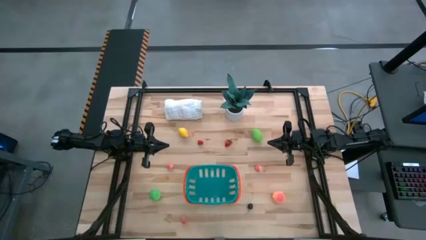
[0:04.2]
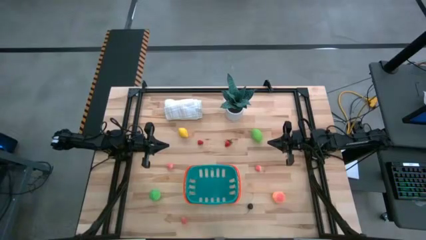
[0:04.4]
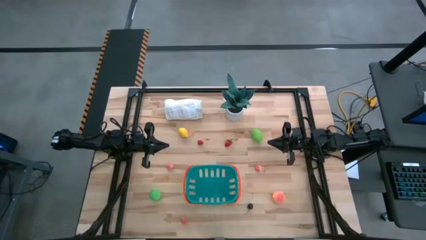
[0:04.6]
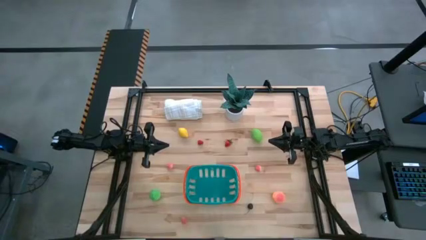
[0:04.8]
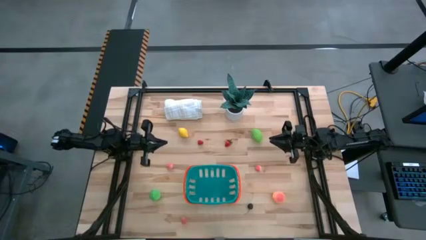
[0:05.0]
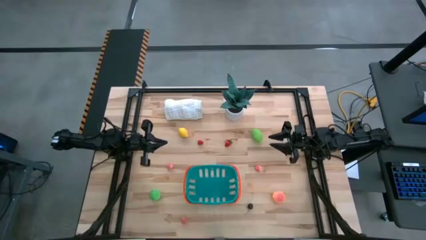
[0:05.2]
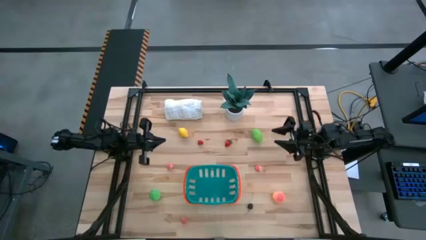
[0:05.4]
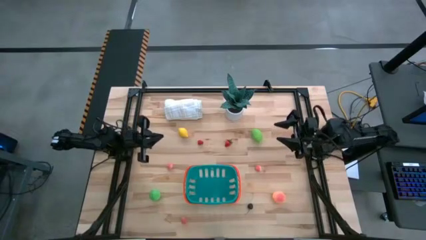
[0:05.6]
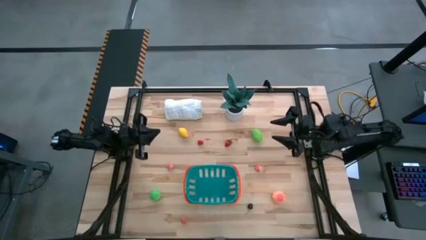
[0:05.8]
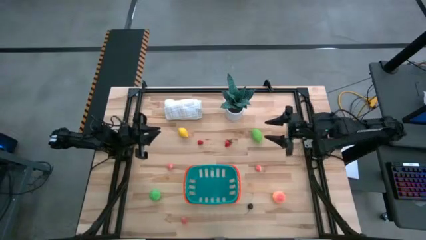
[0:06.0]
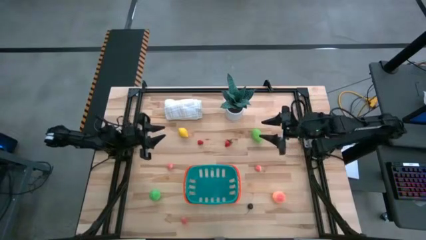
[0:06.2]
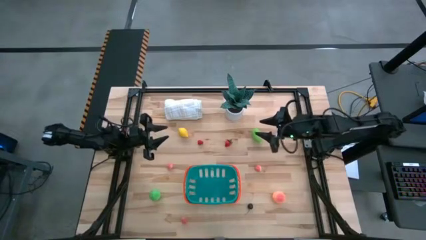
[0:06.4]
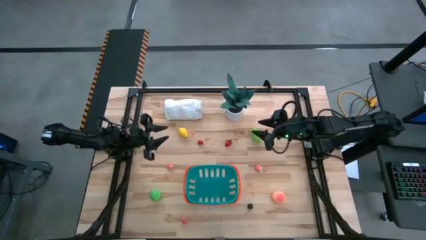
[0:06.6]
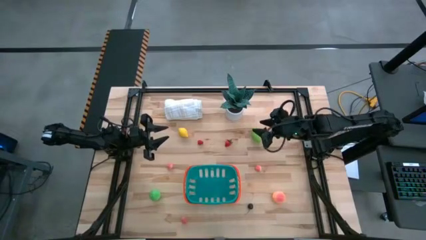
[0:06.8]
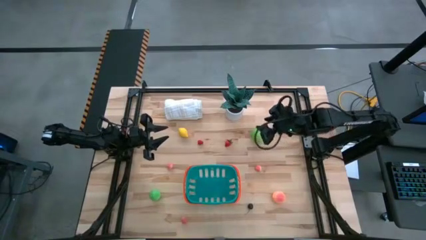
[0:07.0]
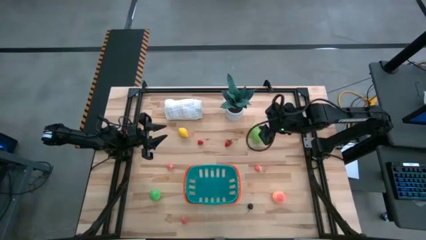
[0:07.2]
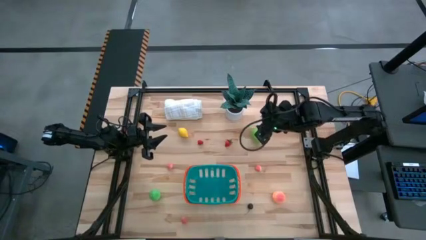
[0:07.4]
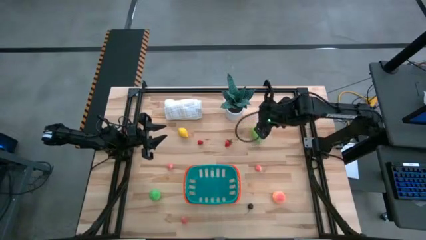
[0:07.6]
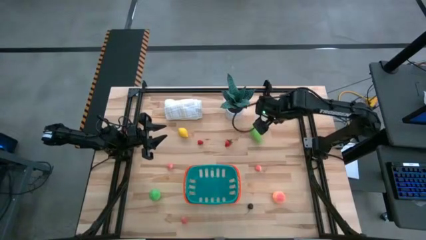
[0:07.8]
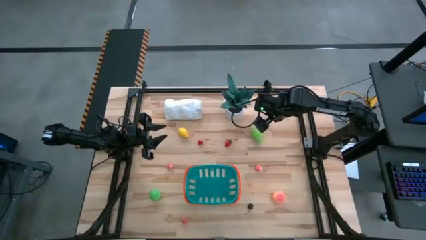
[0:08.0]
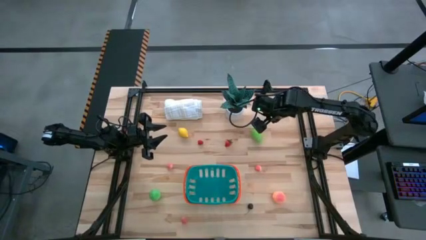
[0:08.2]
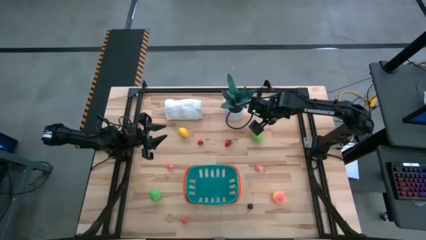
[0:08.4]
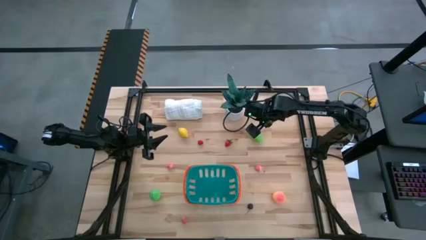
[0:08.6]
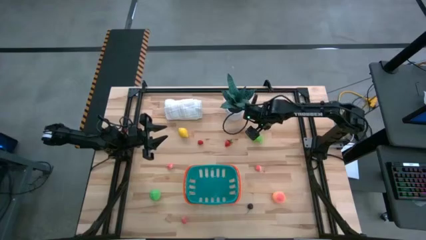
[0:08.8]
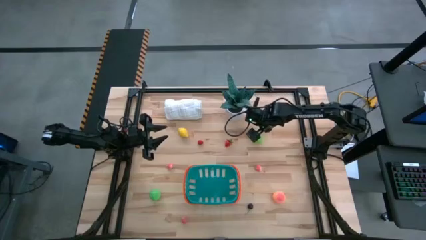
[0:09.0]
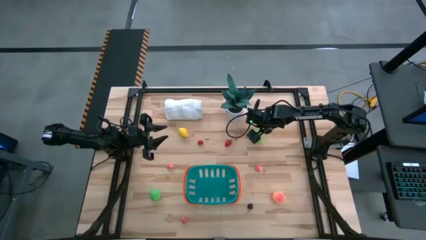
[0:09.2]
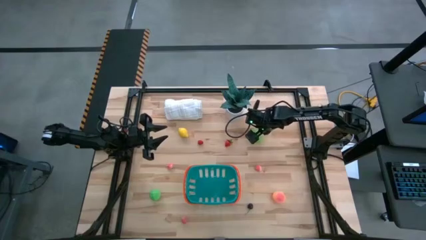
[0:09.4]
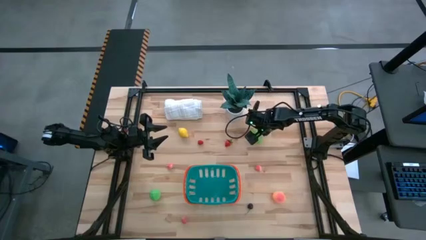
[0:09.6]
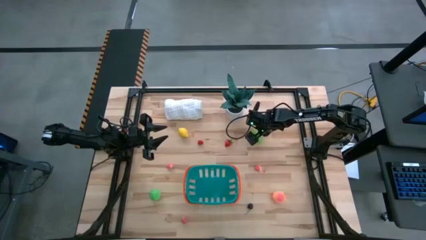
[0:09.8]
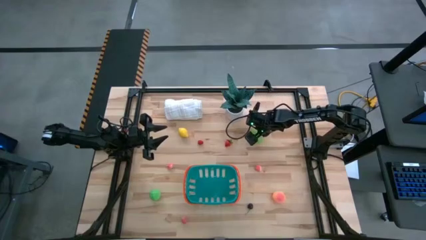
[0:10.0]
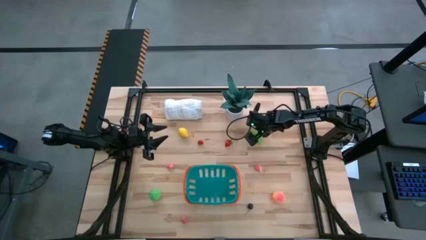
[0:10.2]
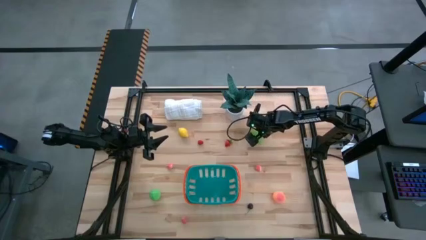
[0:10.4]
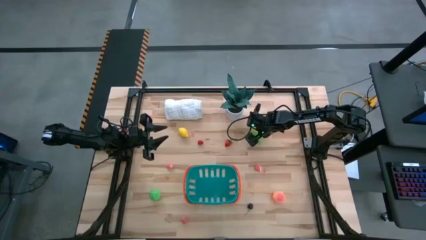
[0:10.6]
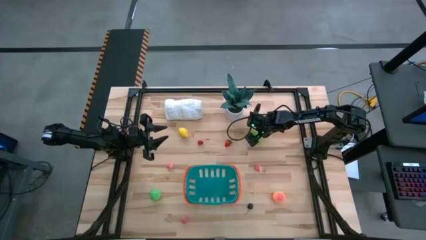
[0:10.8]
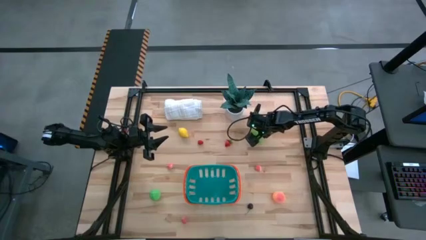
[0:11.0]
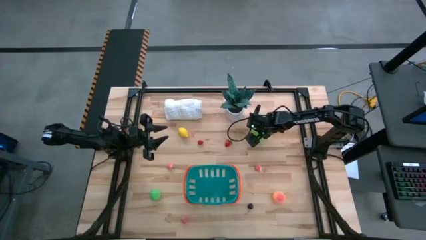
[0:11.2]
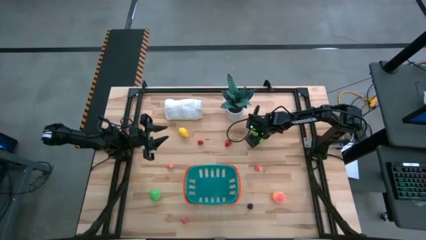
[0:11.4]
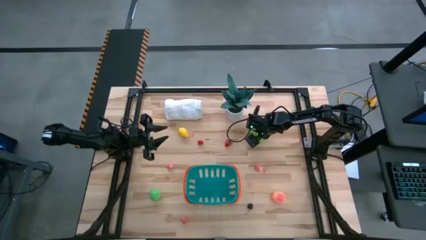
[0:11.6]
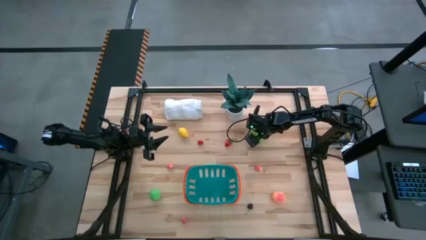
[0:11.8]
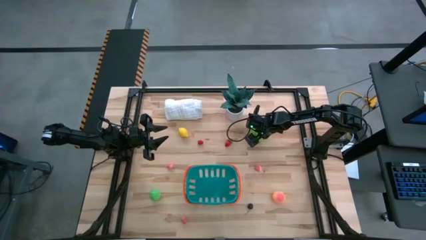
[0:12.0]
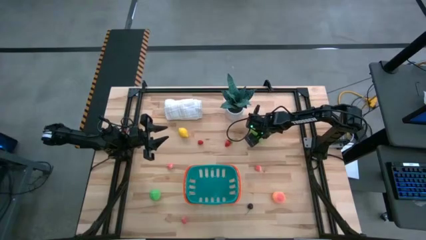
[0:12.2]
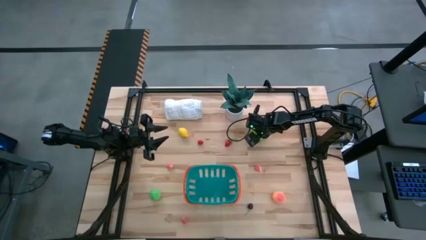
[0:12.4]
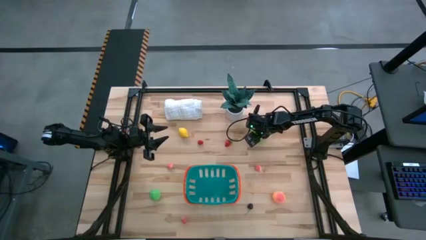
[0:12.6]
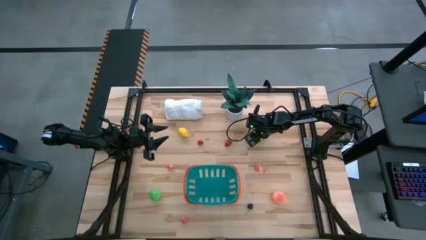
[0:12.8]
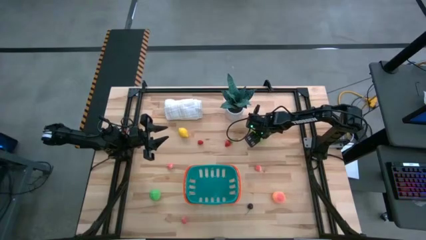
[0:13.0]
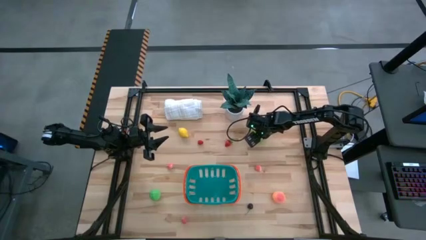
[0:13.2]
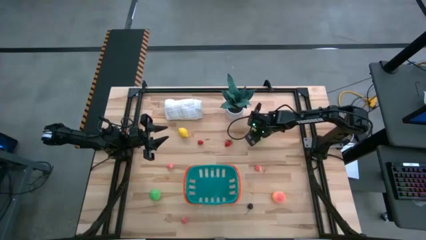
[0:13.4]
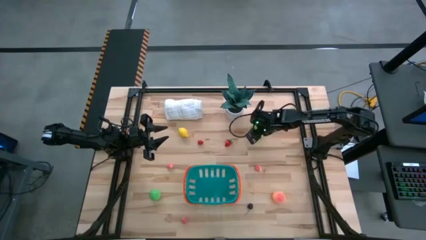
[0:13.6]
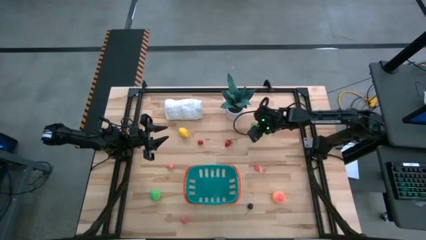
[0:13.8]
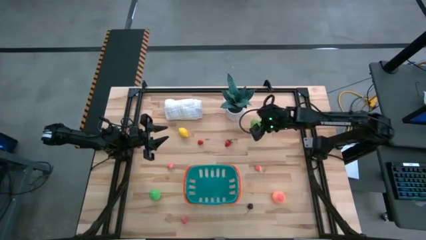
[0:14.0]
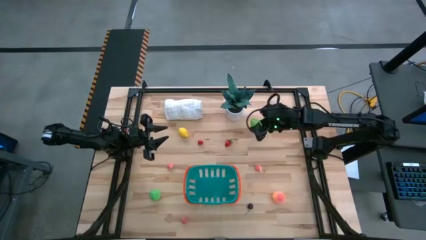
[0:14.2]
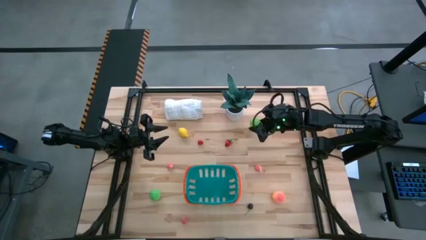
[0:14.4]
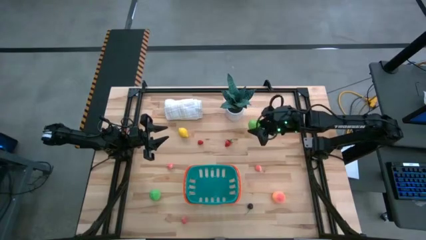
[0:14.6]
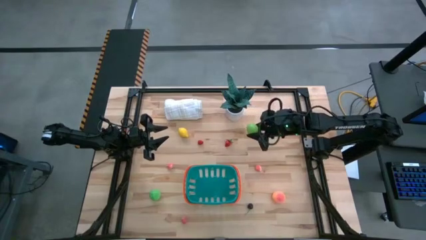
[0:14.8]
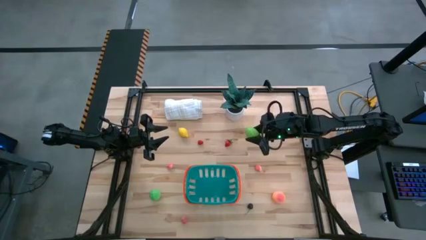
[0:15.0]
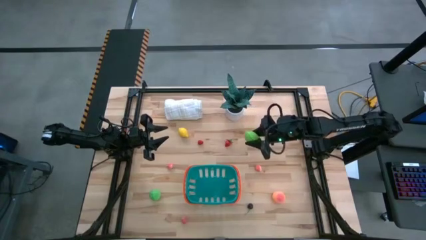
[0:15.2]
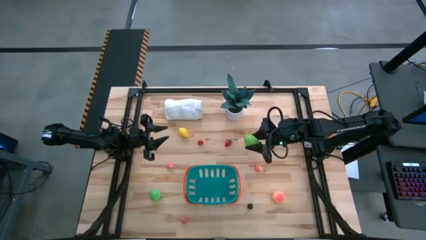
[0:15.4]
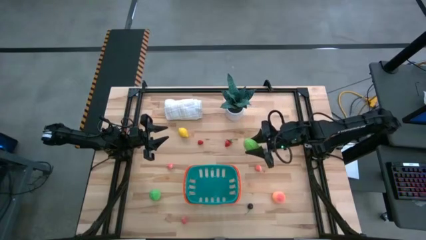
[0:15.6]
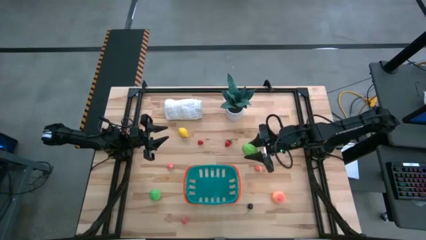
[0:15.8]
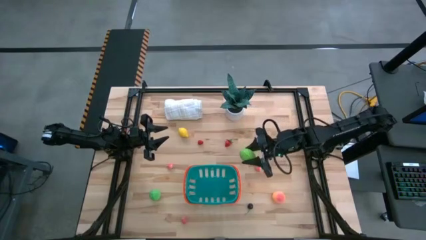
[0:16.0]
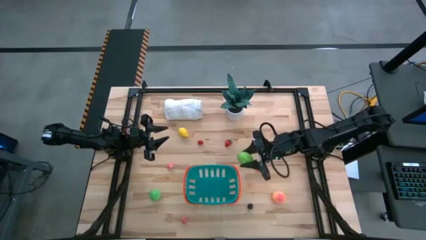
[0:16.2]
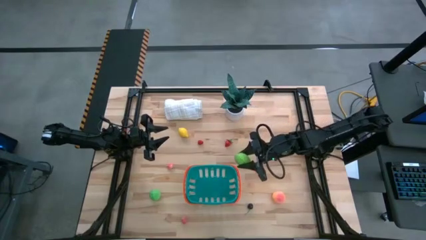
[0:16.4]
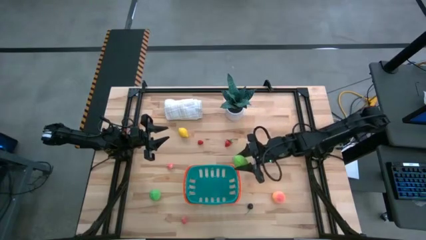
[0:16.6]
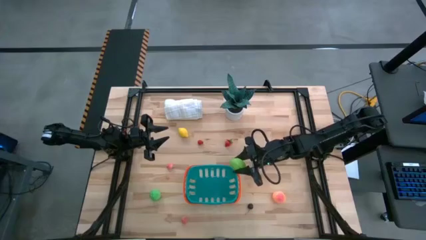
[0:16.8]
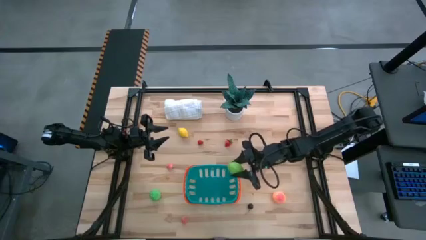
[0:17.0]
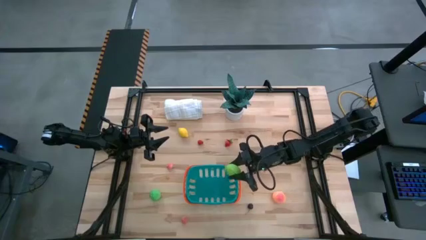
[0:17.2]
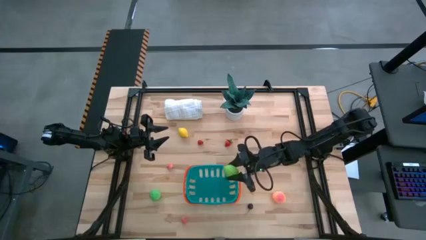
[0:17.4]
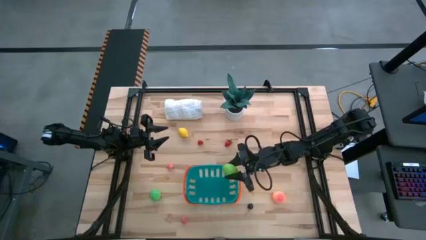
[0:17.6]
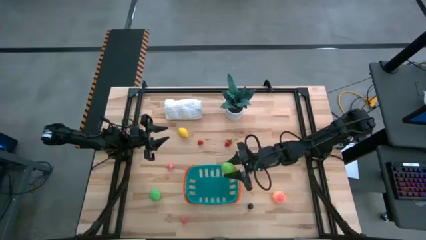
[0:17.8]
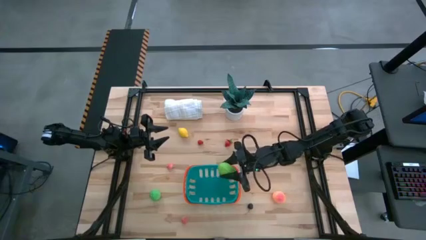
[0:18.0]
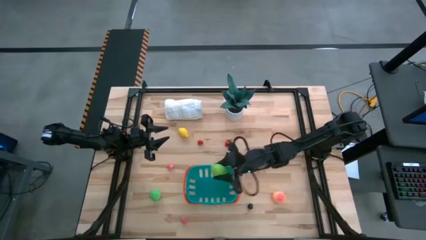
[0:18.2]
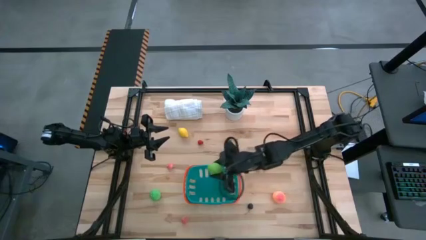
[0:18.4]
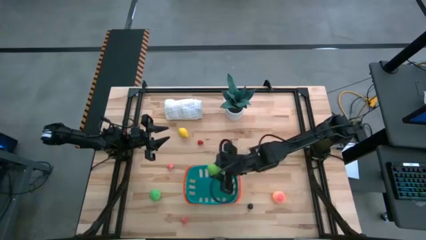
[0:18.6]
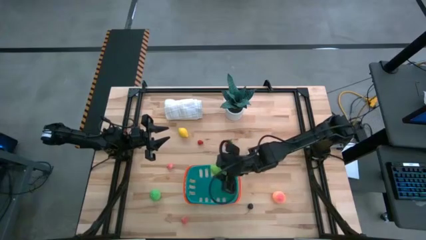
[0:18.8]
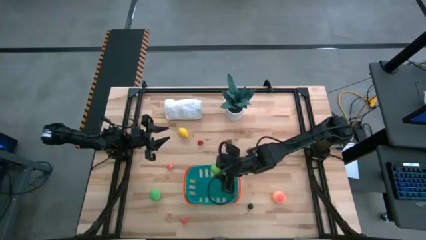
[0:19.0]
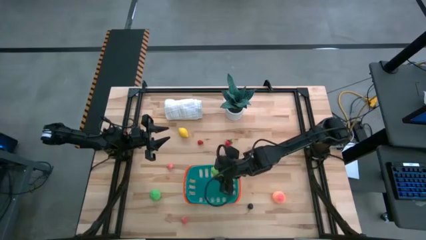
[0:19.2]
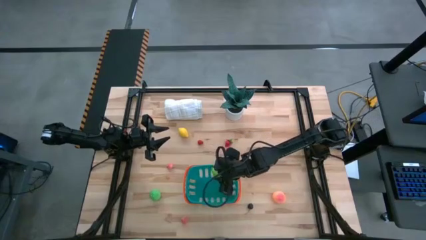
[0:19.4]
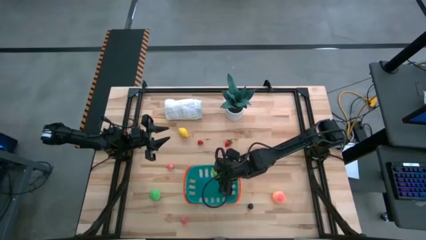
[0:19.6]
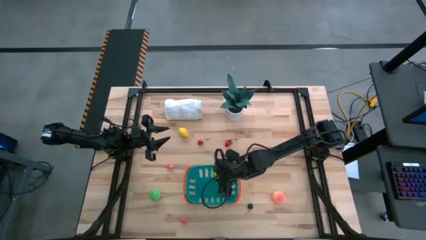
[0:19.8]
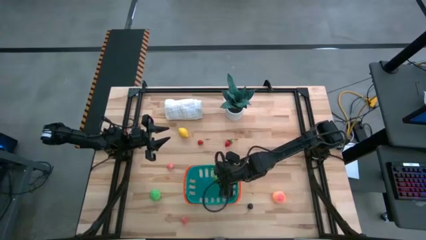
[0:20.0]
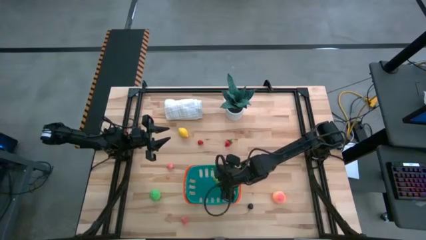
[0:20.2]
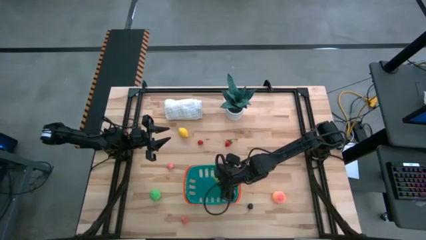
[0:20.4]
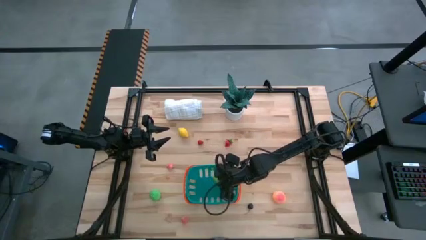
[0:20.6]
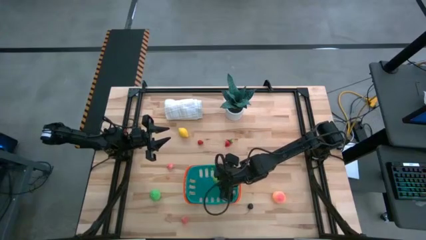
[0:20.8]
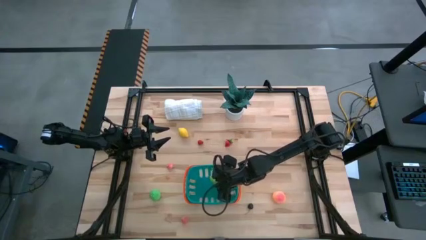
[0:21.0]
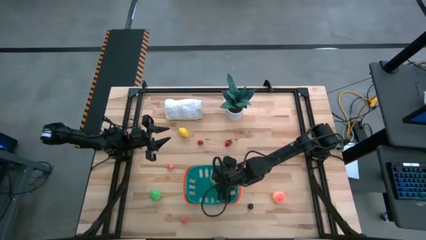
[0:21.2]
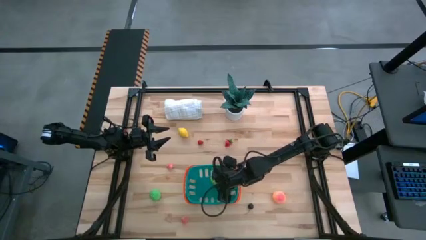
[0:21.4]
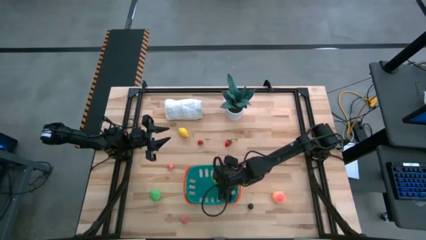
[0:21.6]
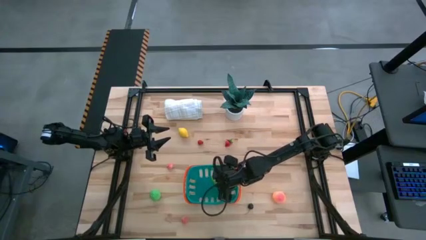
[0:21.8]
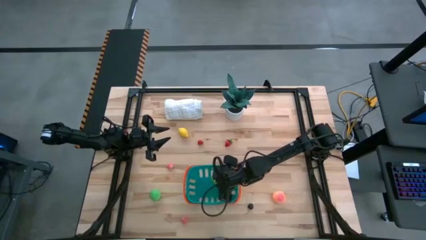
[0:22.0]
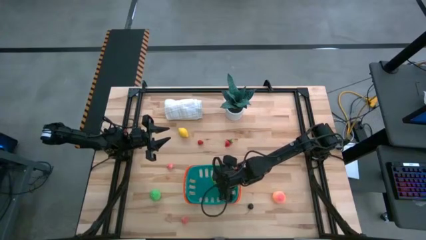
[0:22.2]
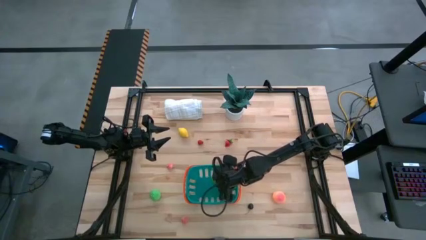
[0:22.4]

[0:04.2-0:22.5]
Task: Pick and placing Produce into tupperware
Put the green guava into the blue bin
